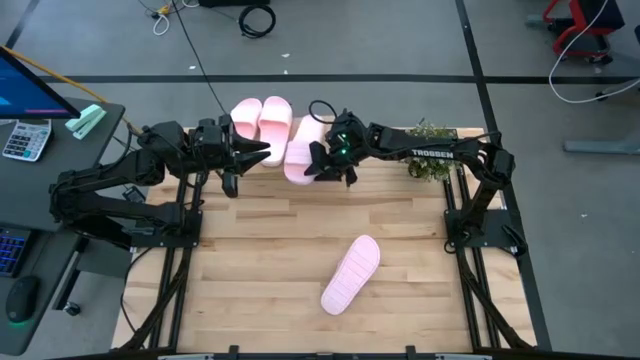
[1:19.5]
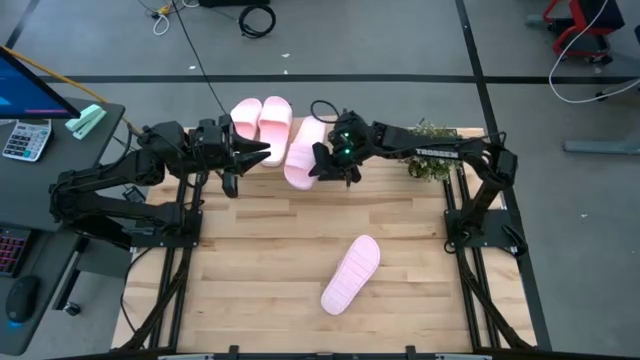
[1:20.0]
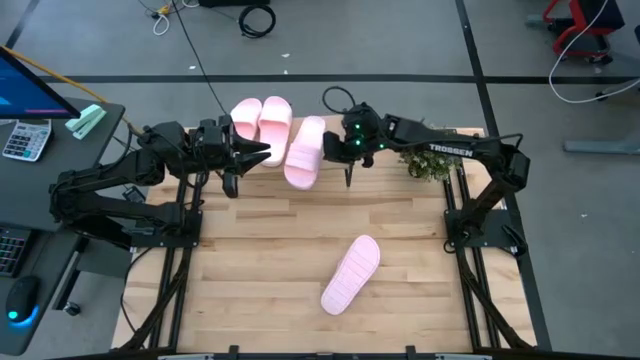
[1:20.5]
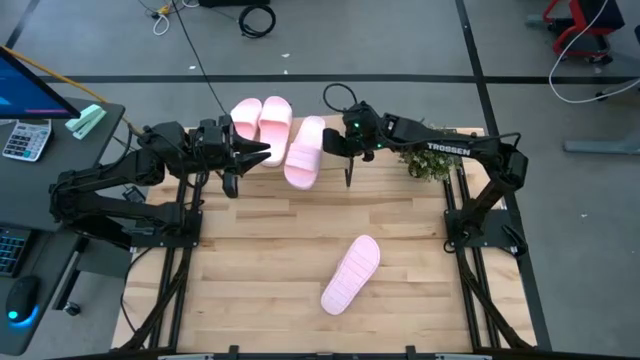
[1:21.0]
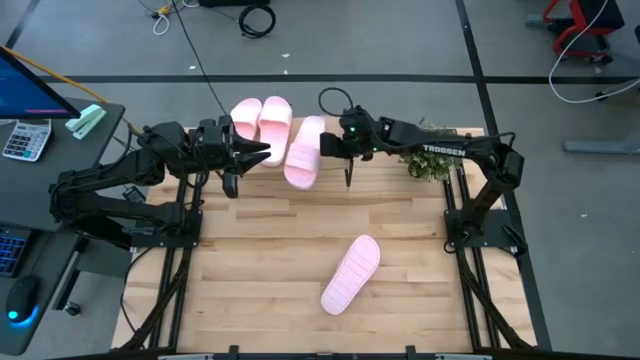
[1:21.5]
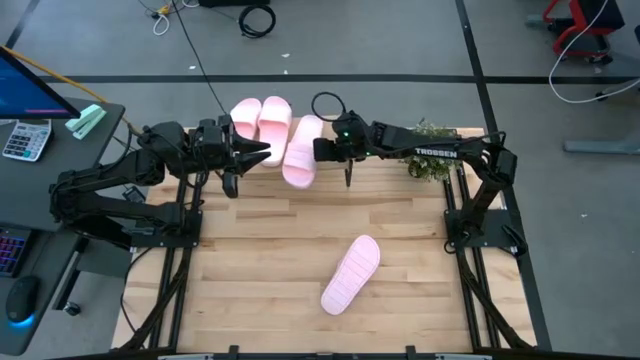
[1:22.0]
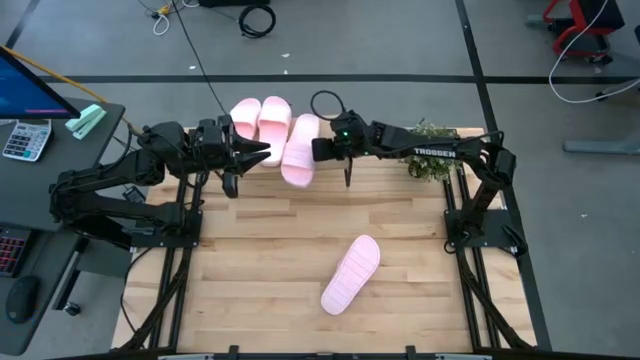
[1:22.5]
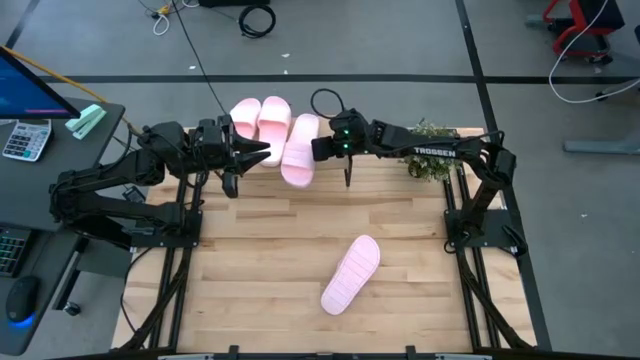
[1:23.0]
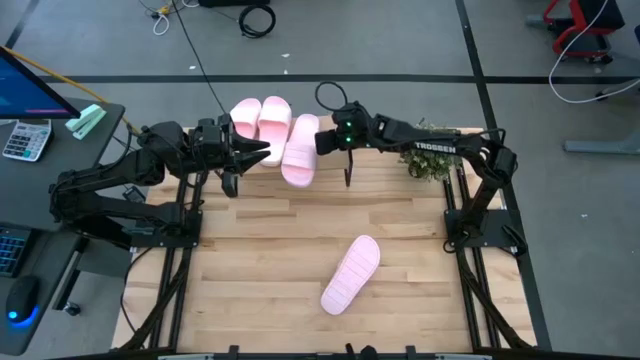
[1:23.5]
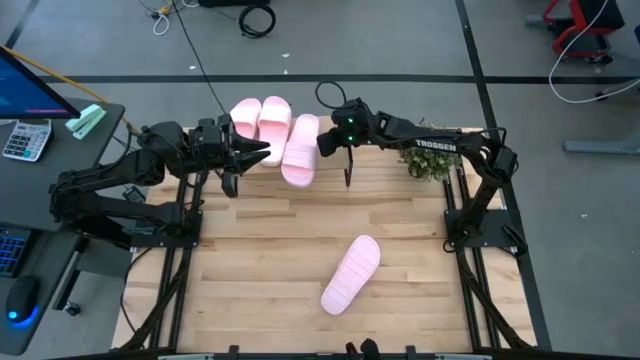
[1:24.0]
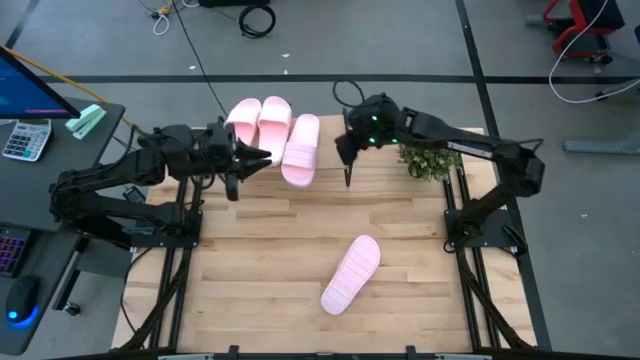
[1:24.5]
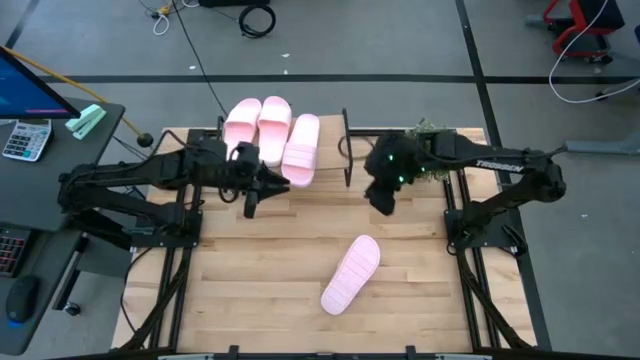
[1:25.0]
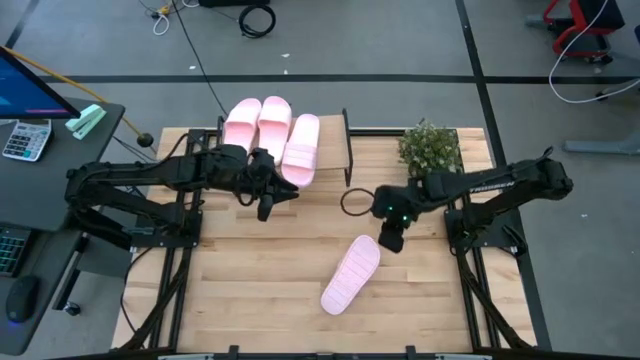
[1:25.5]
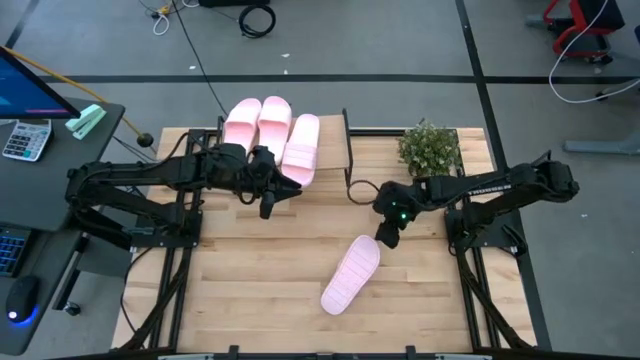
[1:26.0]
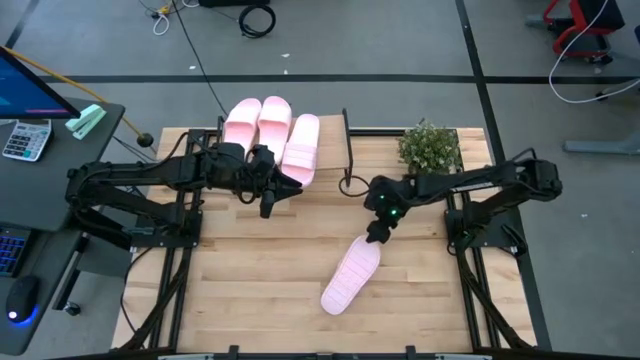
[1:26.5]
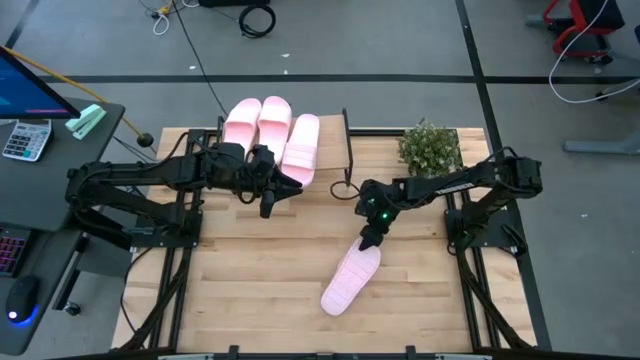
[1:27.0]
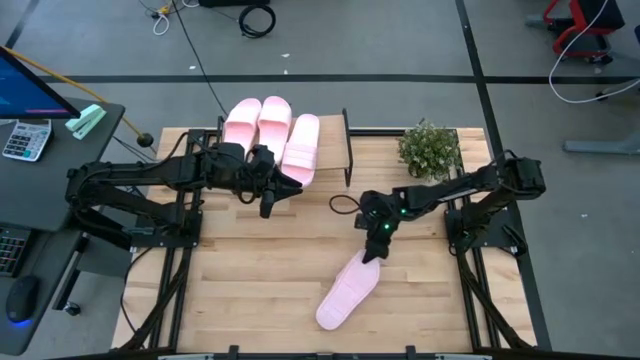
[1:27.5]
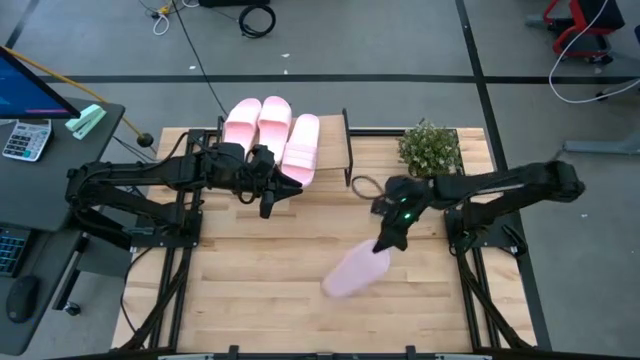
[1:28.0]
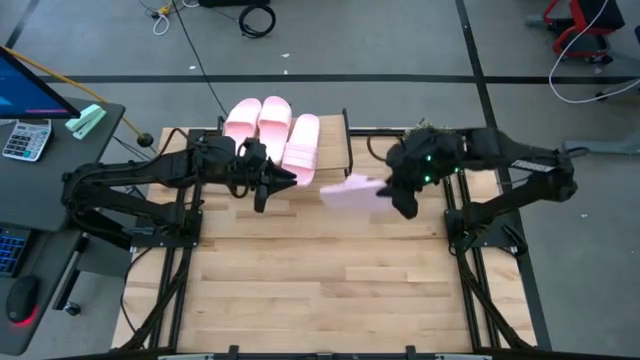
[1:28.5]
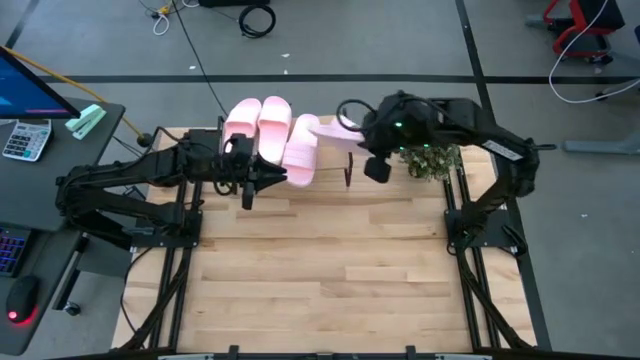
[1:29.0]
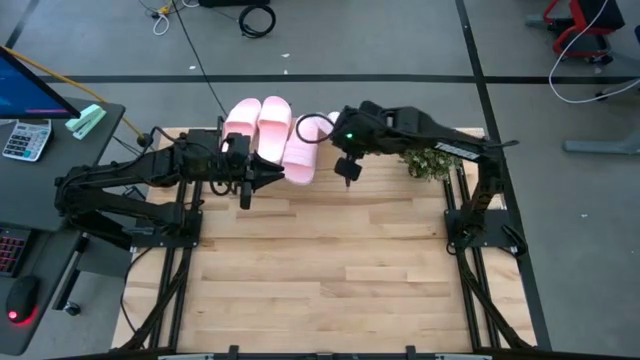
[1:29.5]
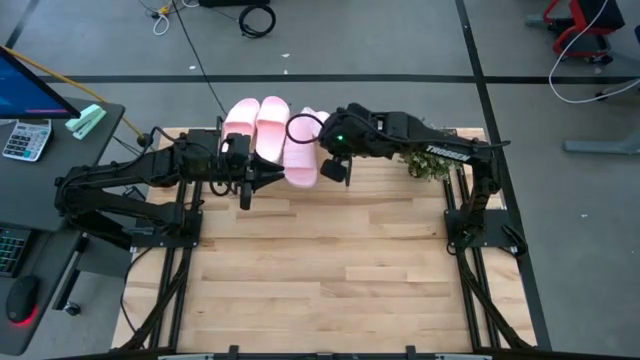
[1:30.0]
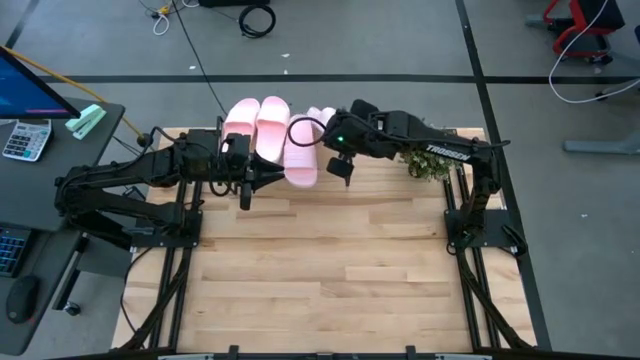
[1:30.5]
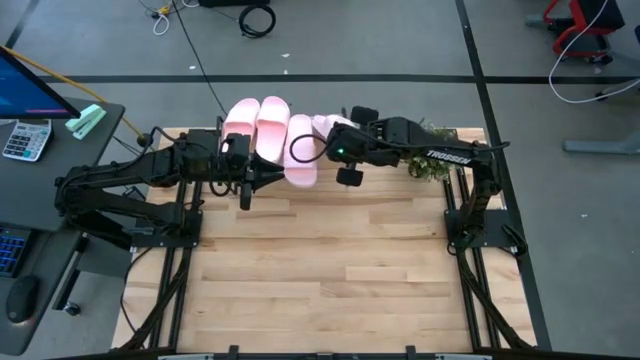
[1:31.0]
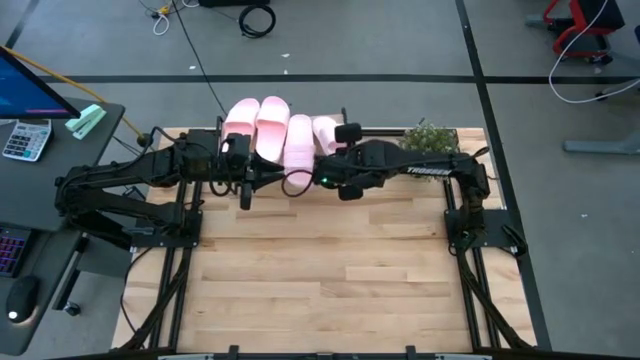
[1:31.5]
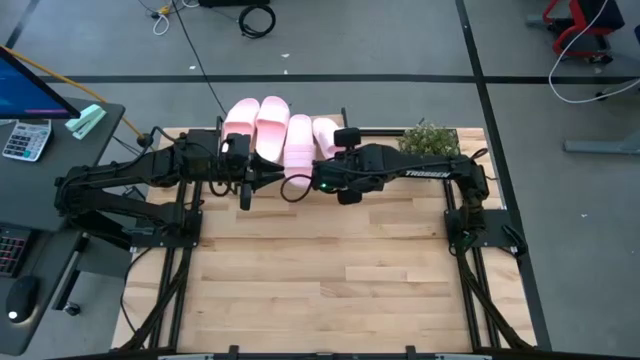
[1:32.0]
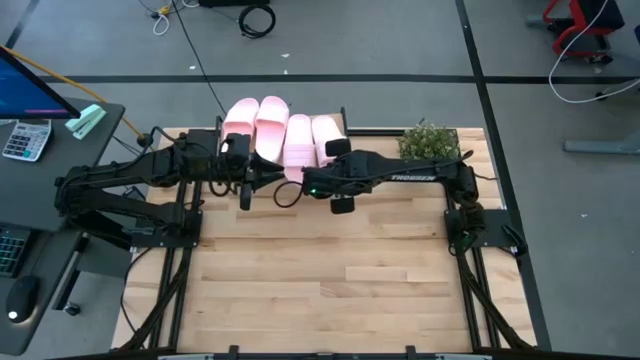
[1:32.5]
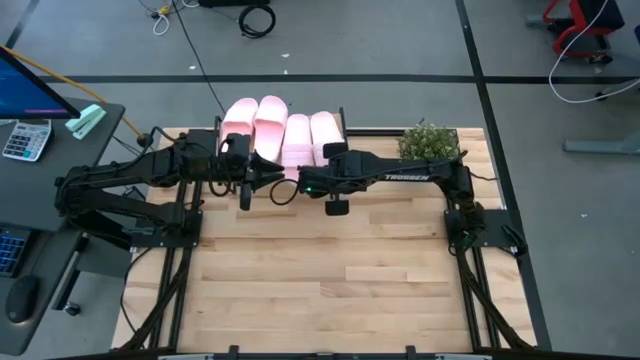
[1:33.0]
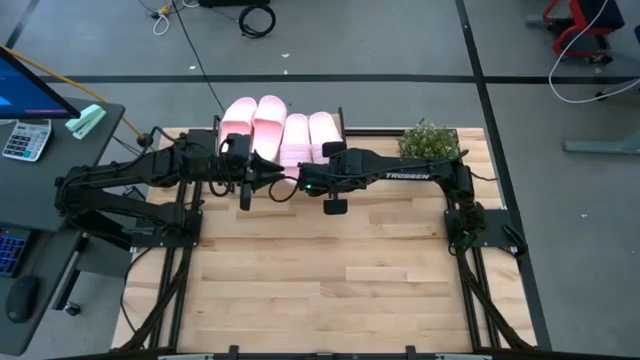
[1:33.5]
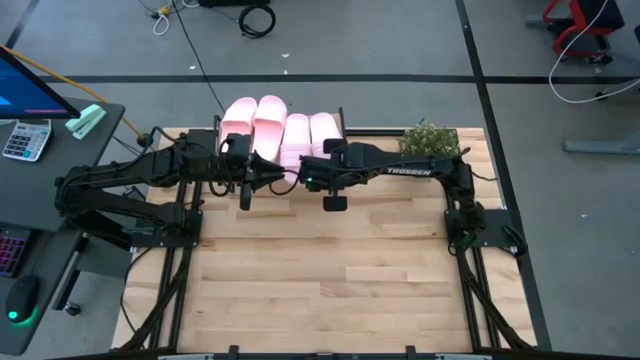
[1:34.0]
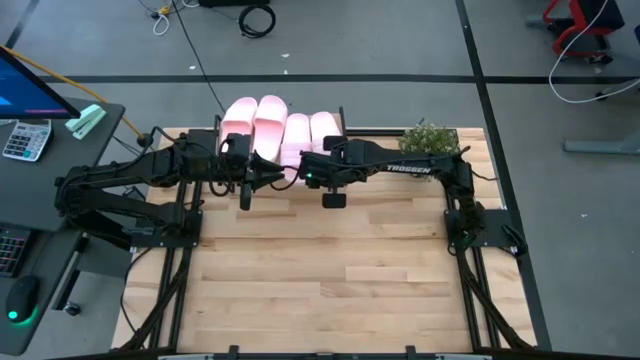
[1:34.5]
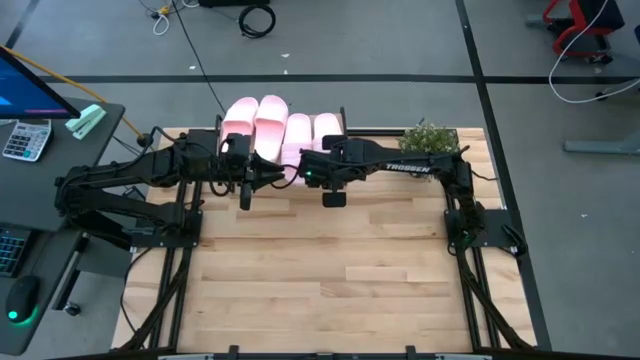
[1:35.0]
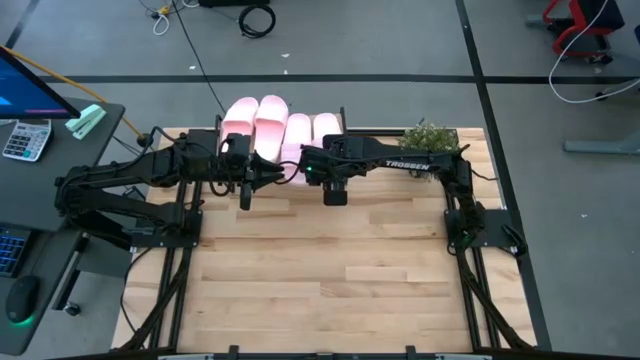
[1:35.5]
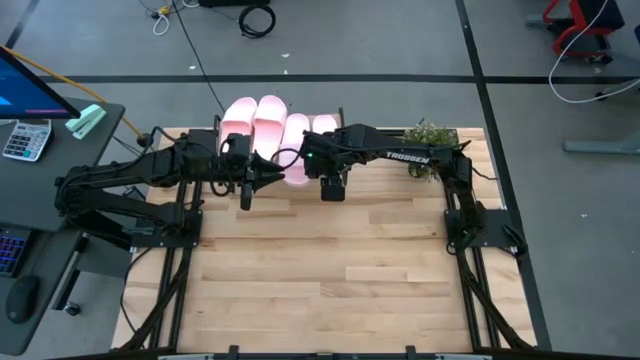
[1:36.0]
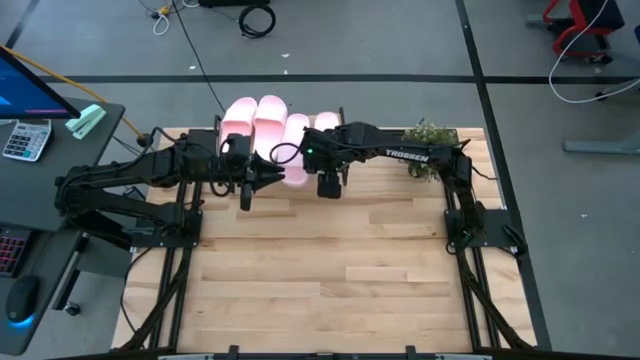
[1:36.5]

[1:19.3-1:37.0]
Task: Pick and place slides into the shelf
Put the pink slides on the shelf

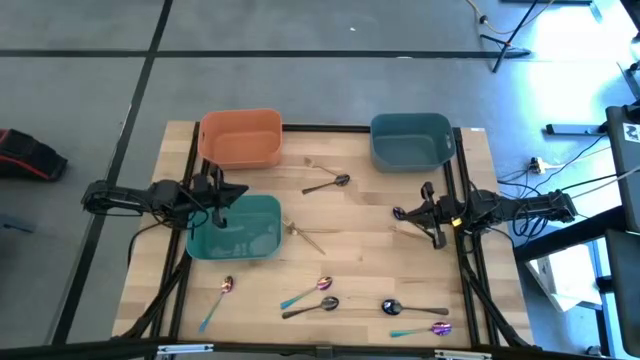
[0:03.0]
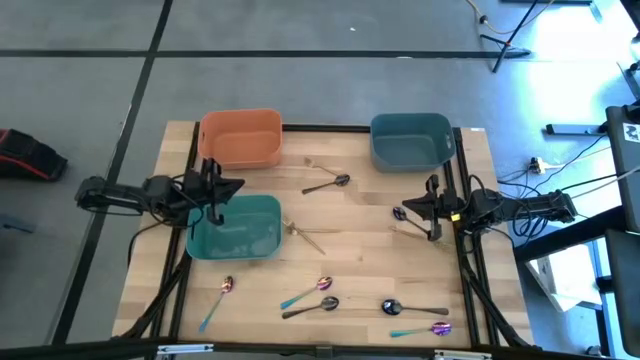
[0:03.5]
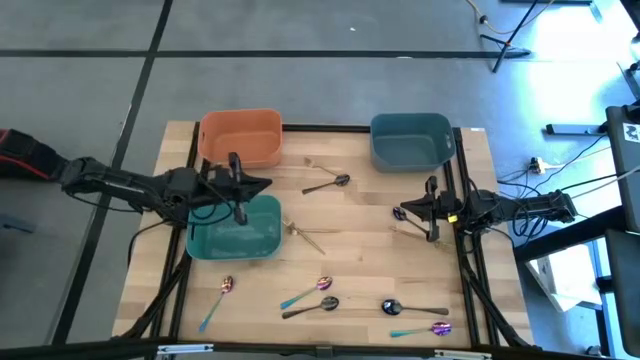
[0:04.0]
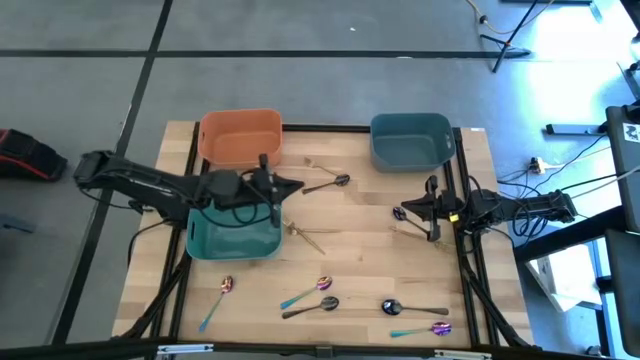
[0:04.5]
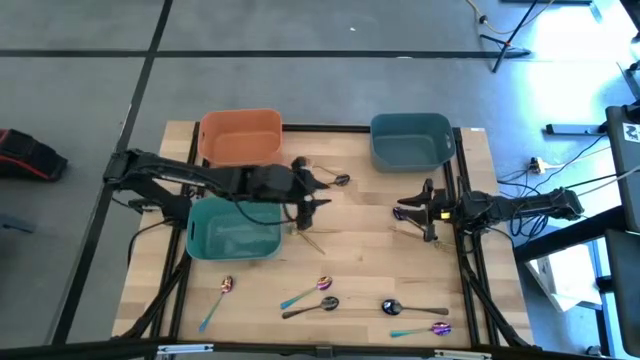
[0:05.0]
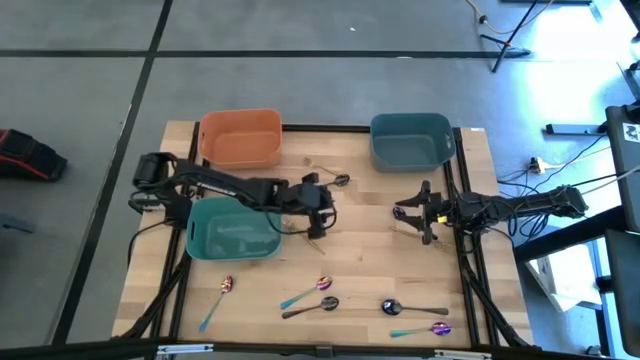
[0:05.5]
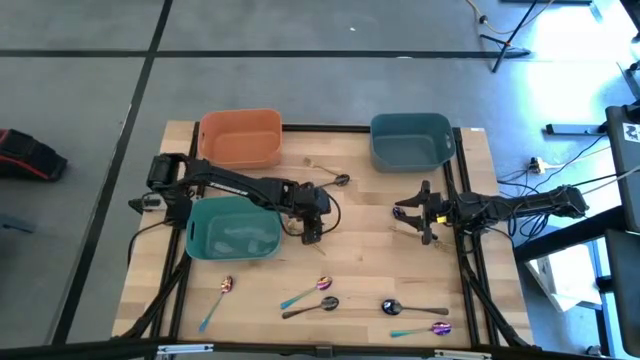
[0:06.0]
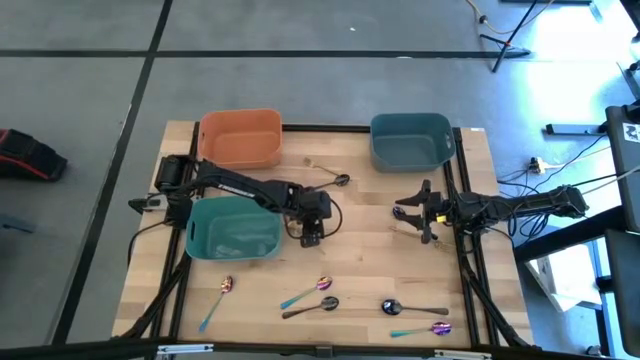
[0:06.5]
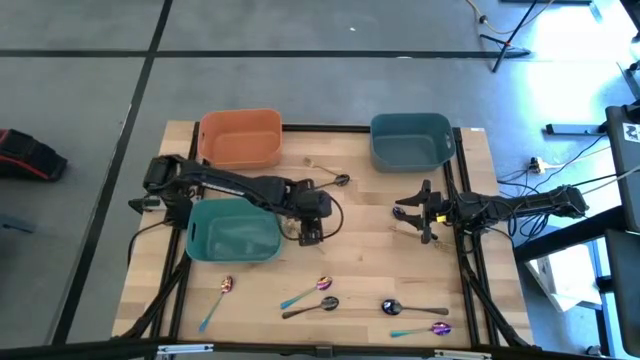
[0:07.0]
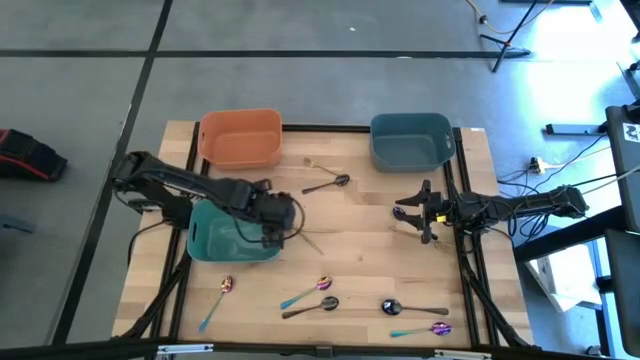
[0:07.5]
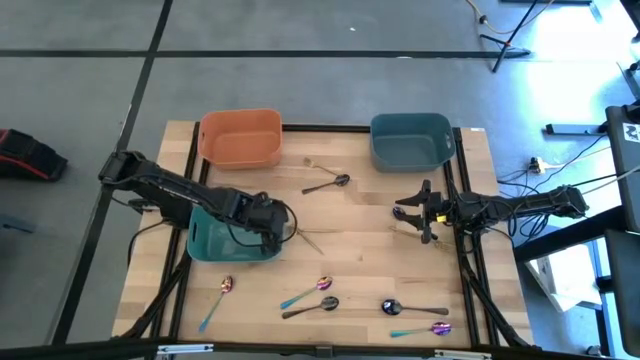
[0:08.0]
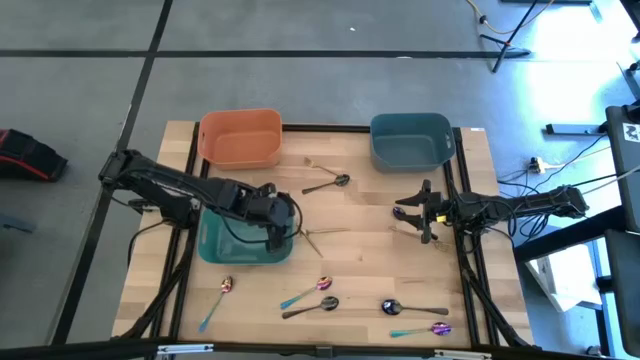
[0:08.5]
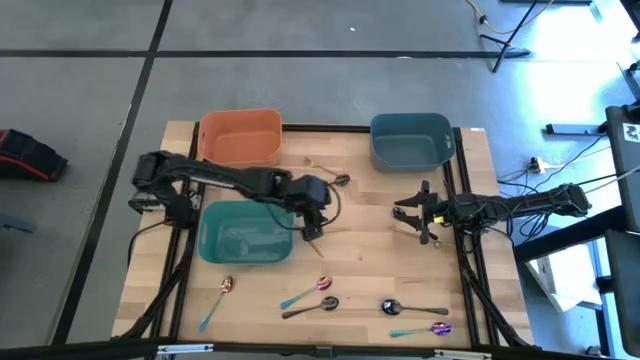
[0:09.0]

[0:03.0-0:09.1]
Task: Sort silverware by color (type)
Adjust the bottom blue bin
